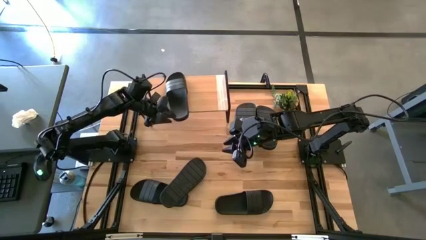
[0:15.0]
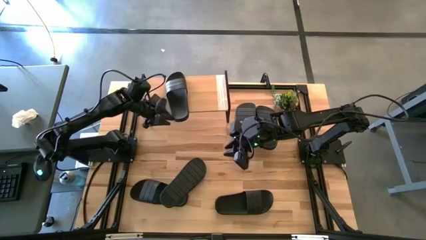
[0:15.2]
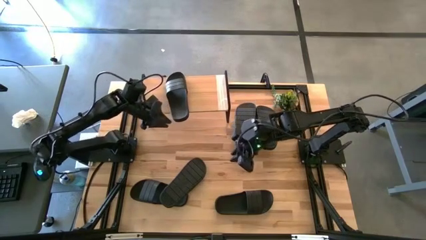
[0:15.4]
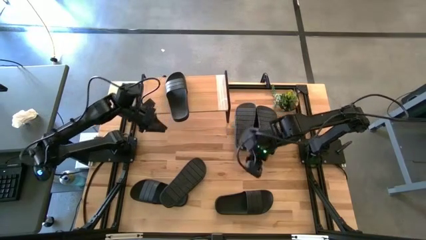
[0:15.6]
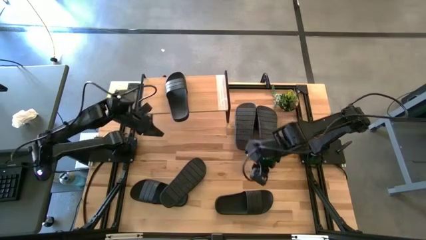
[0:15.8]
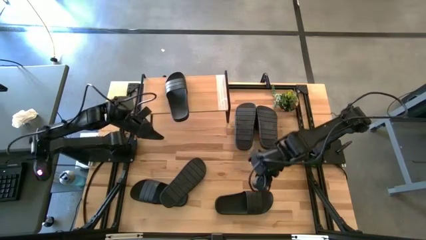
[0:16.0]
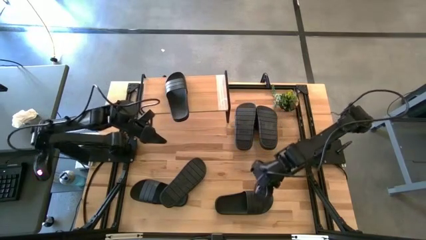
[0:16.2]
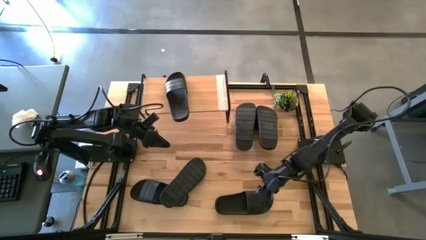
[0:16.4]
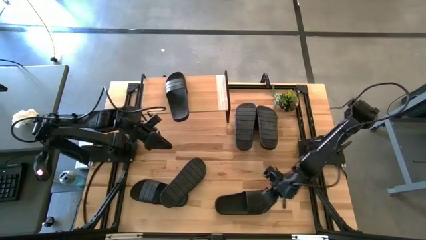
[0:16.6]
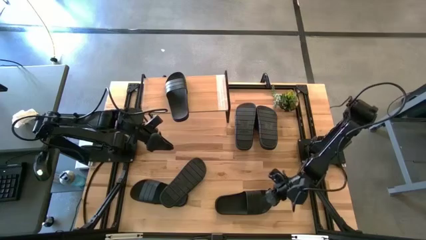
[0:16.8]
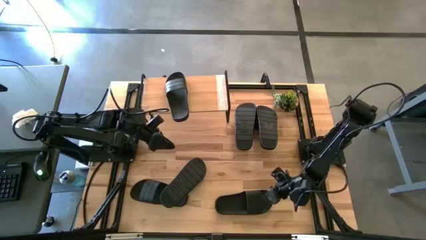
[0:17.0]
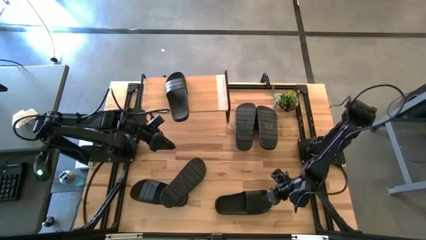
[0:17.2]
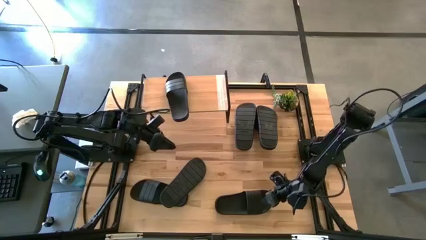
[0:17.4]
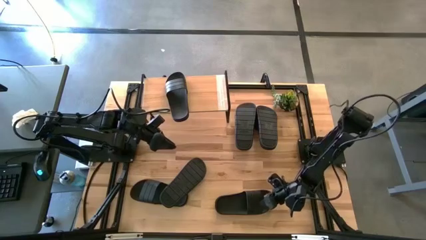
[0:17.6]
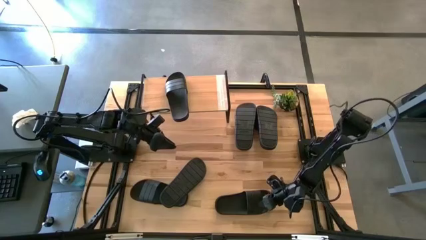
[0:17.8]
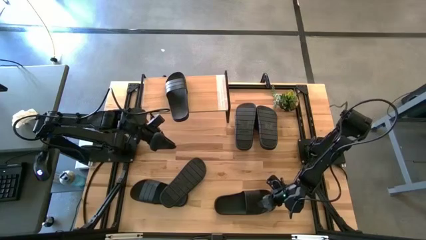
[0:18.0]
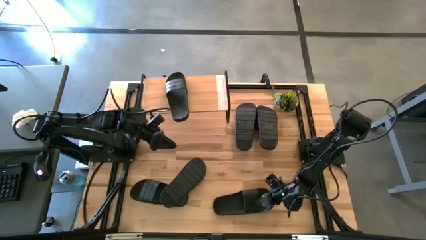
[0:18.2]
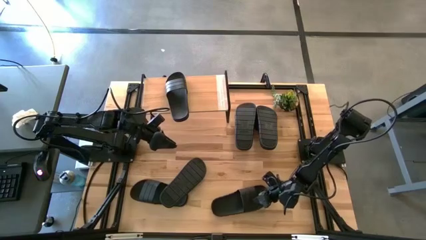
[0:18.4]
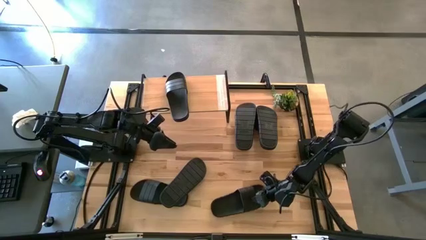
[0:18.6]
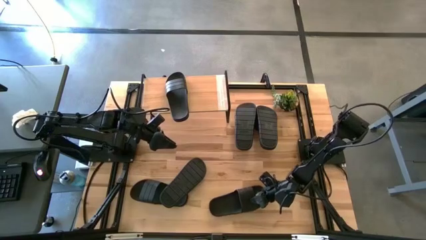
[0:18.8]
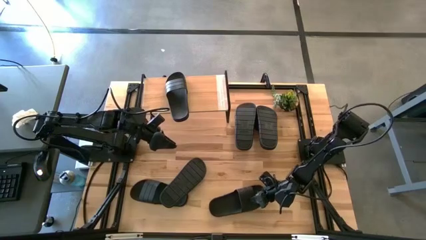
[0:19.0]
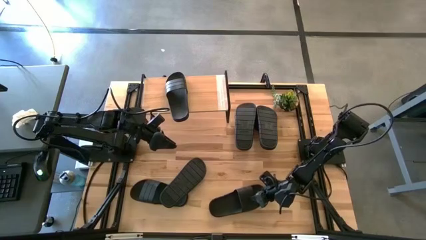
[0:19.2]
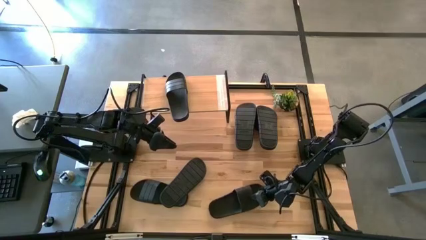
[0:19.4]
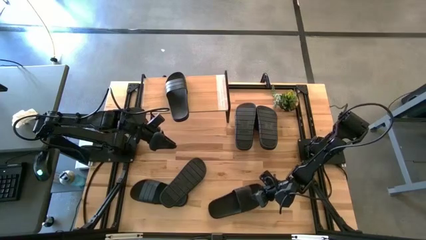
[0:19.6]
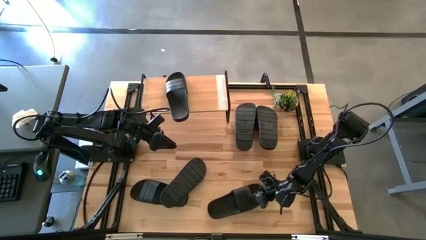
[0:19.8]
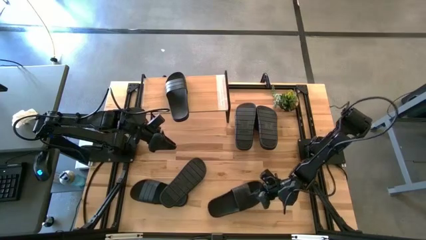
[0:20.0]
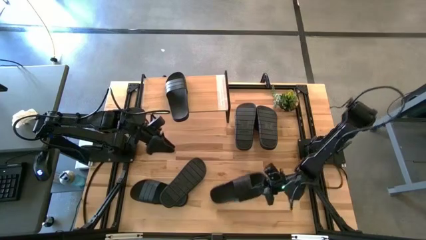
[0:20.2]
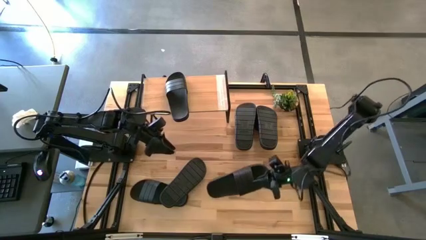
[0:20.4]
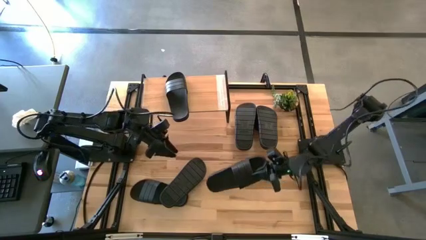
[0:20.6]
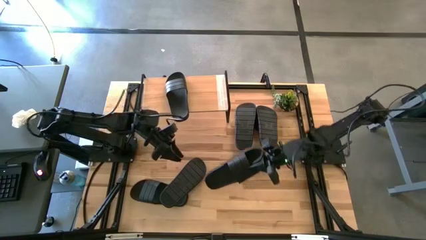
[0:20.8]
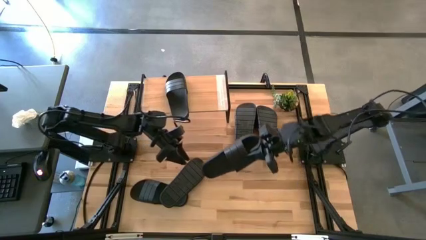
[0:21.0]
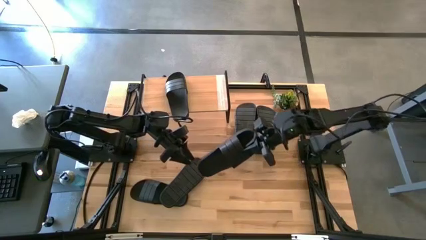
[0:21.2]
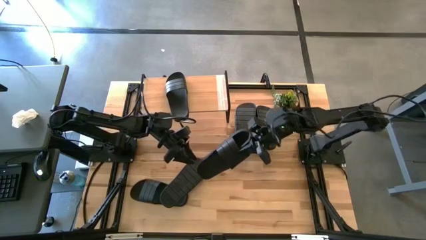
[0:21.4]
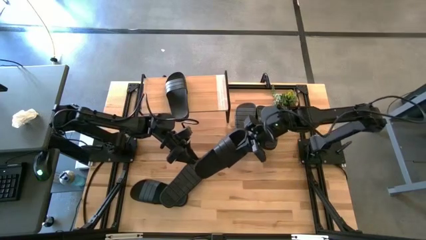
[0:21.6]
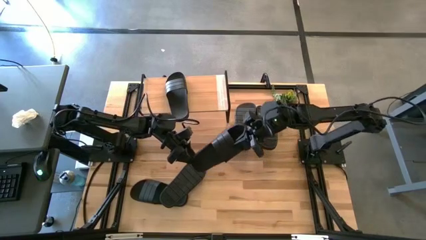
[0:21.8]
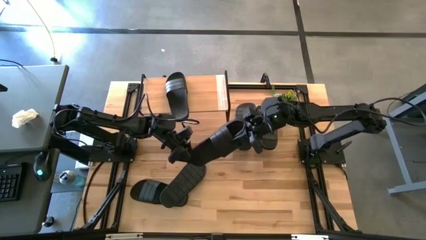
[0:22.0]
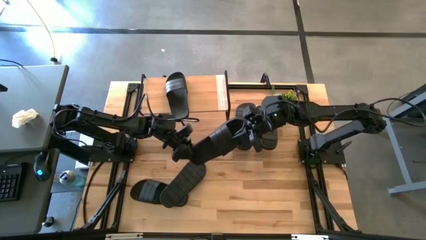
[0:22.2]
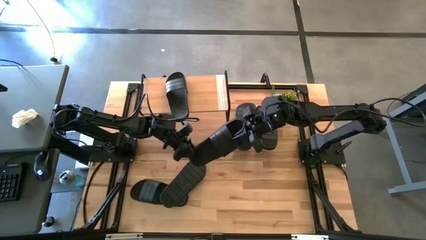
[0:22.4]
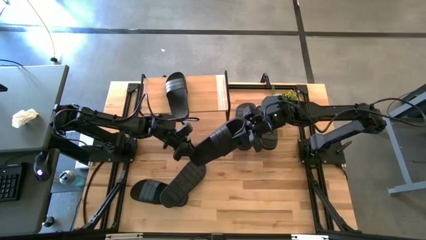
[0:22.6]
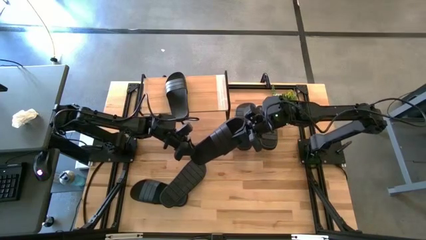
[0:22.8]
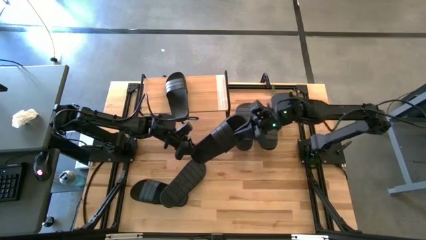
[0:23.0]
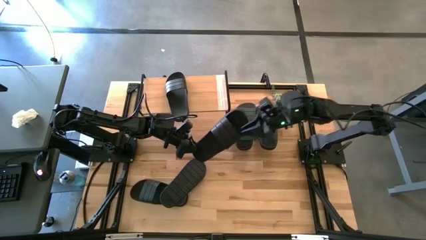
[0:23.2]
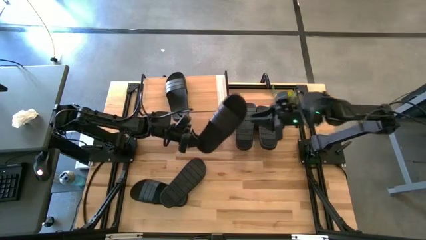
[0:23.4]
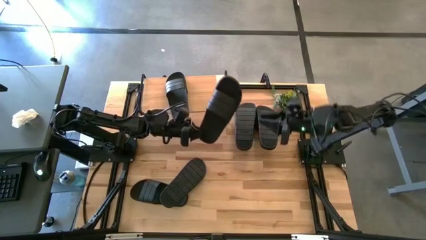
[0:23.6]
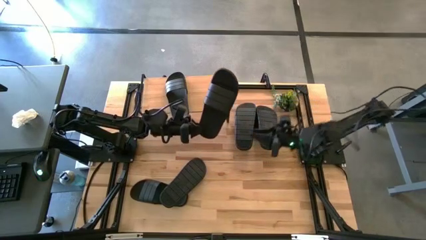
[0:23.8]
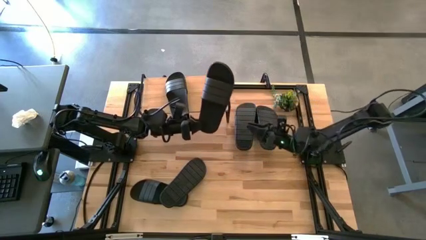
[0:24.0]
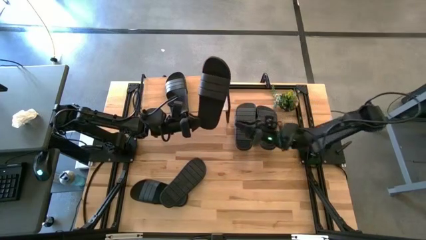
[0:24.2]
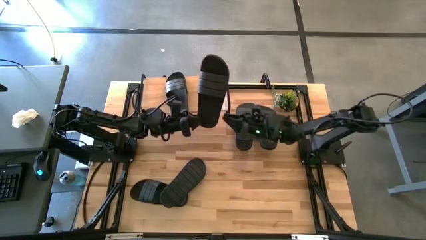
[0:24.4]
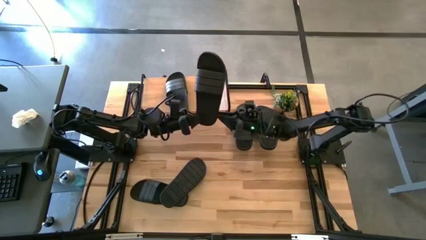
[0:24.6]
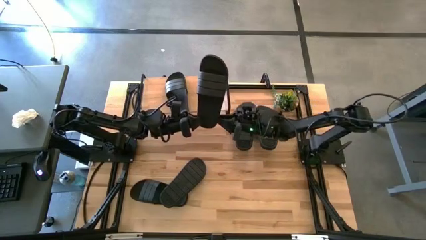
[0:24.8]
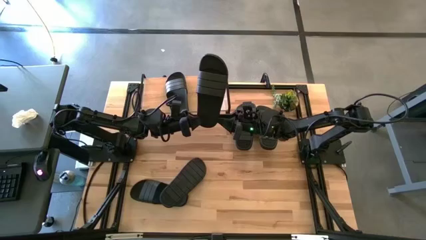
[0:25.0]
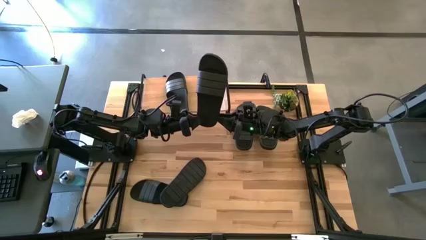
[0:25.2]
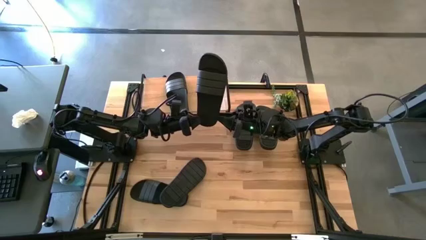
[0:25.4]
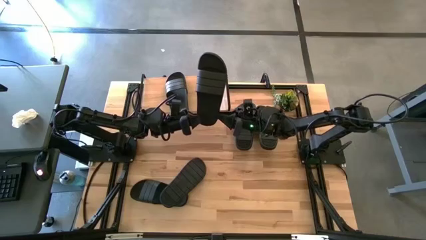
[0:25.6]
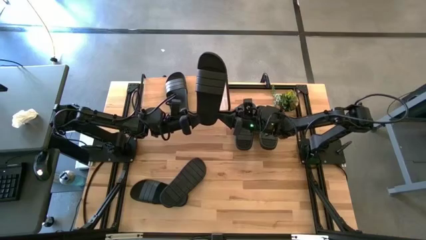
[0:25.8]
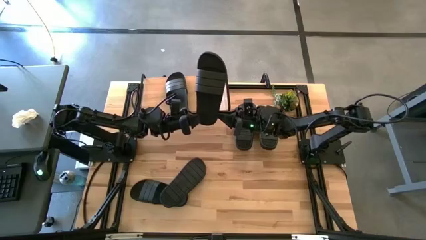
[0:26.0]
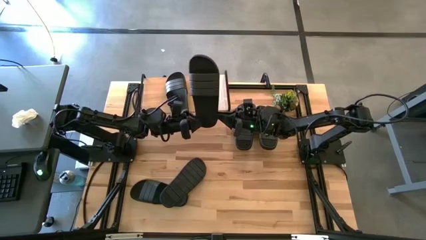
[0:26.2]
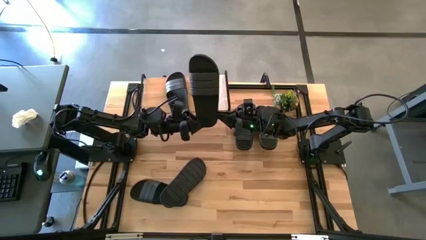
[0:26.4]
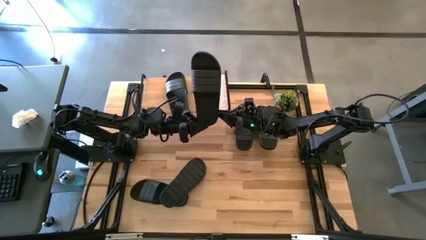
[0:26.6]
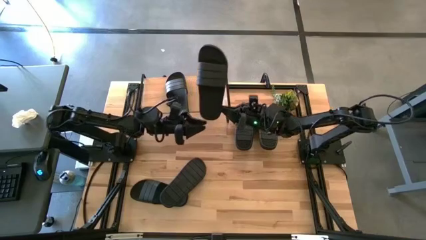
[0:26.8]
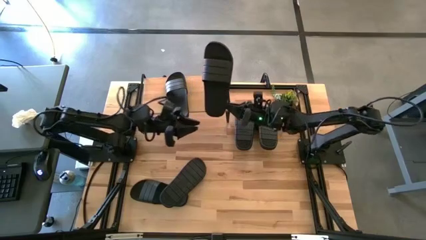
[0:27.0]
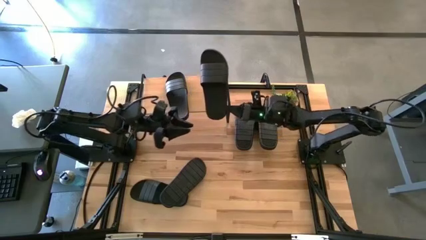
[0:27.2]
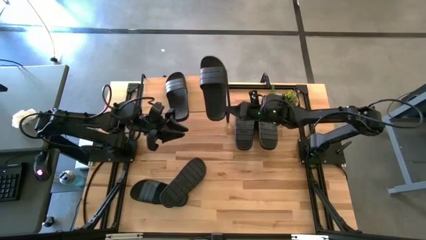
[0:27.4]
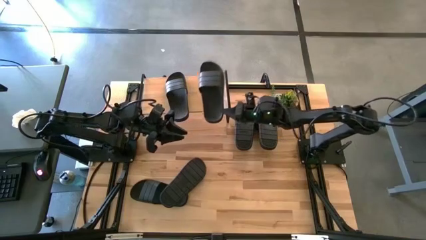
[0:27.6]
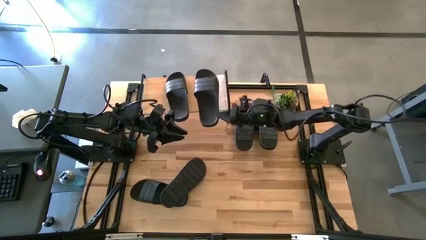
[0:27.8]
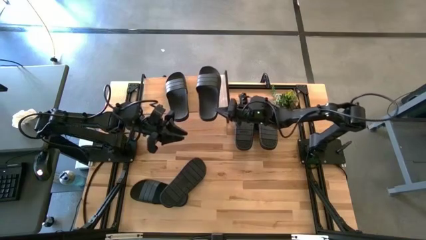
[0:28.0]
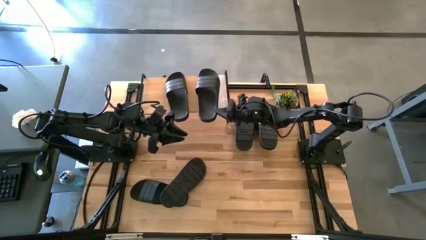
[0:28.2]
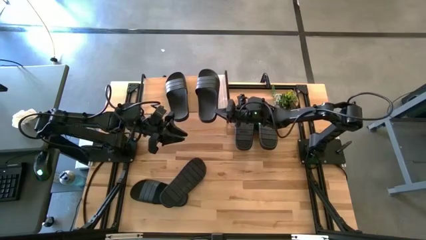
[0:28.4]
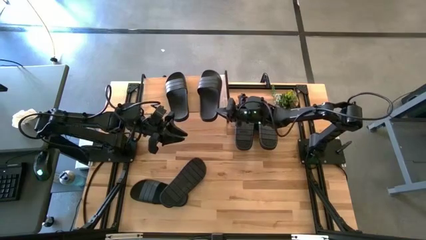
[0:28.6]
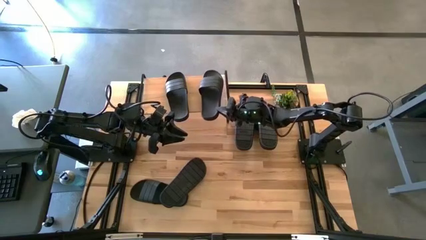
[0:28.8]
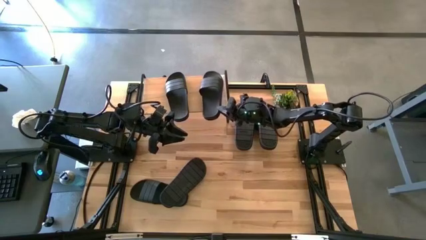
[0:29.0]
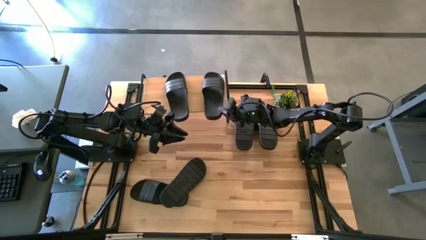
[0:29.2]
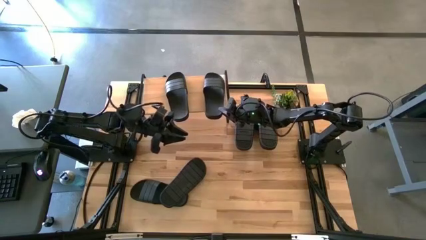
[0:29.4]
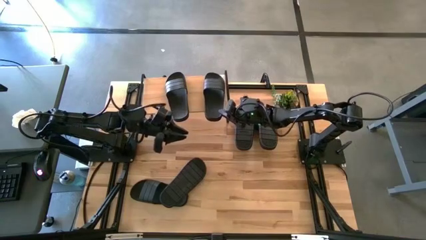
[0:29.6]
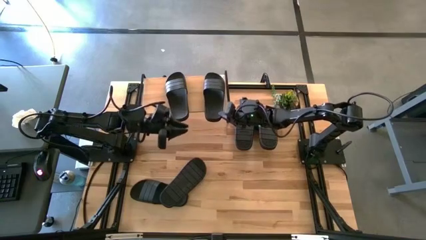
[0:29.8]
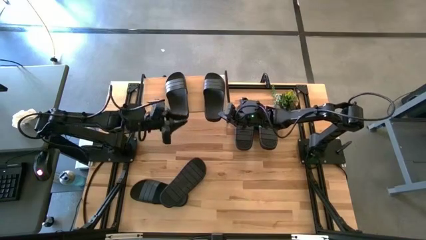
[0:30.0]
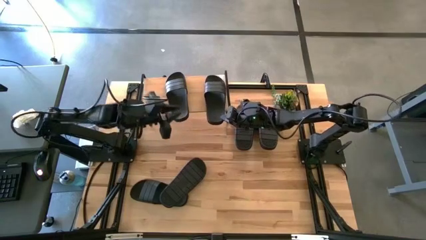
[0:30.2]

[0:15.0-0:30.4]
Task: Pick and place slides into the shelf
Put the black slipper on the shelf

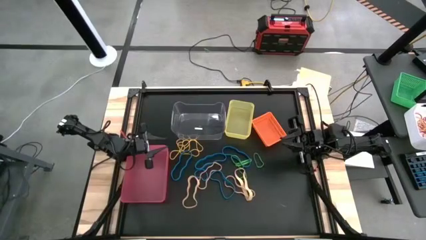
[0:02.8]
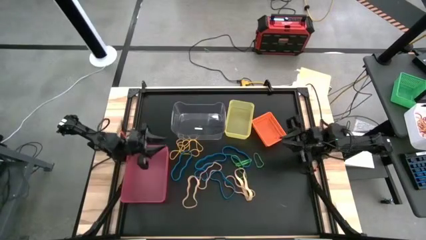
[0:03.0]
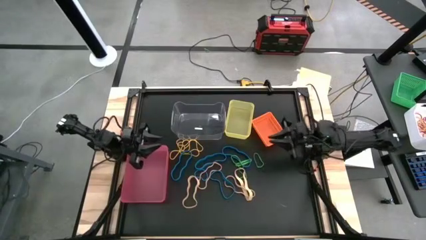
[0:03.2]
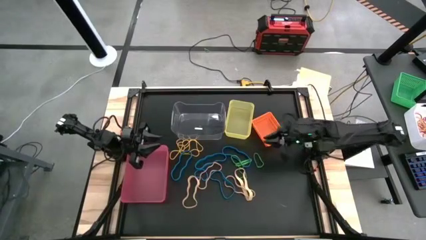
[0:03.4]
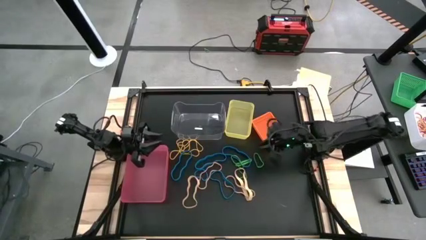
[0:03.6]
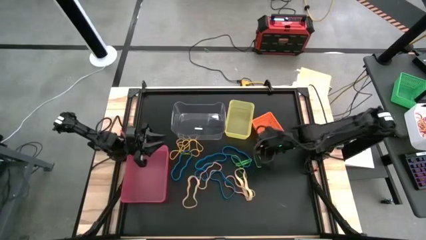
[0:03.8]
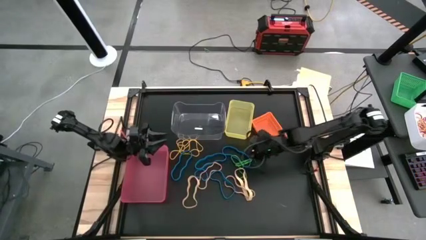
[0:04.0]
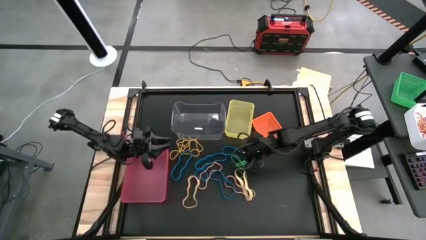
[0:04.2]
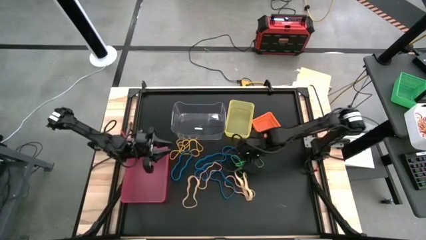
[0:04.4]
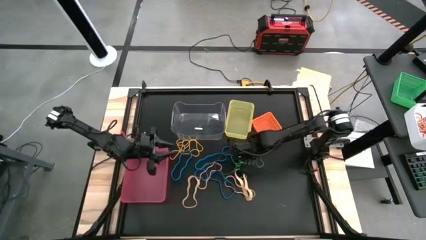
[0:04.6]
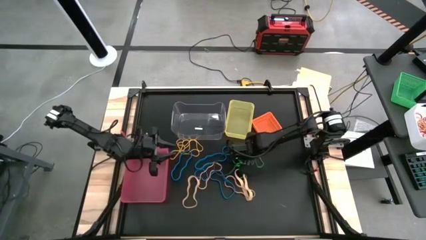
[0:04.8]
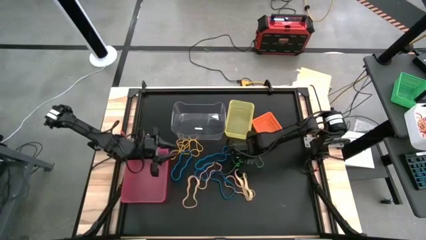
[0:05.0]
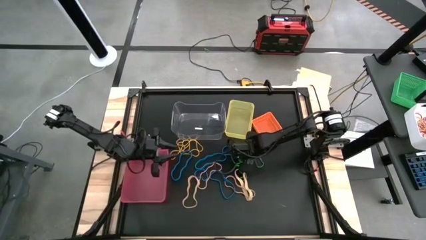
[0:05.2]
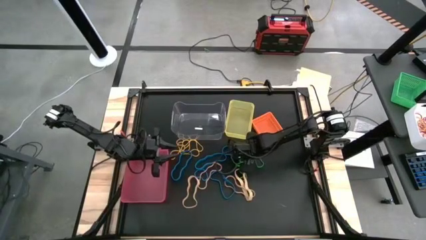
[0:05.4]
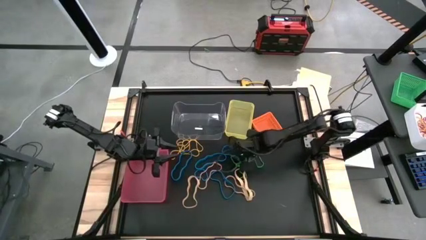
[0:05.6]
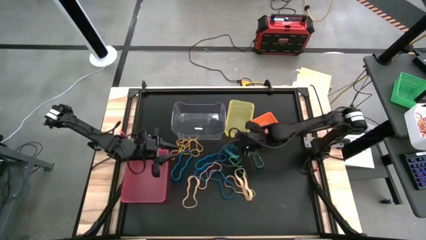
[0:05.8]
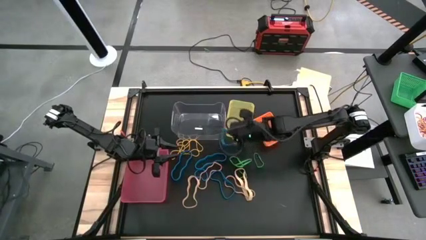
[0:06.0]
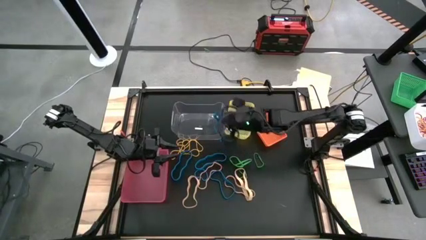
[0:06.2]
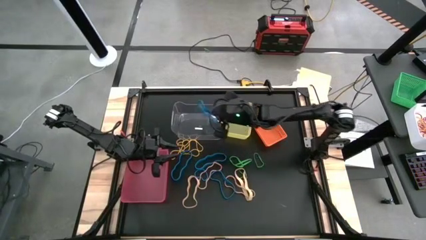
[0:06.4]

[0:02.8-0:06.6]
Task: Sort rubber bands into baskets
Put the blue rubber band into the transparent bin
